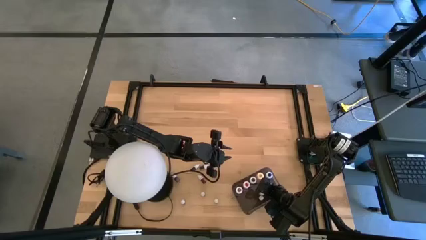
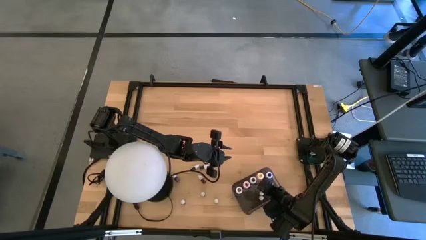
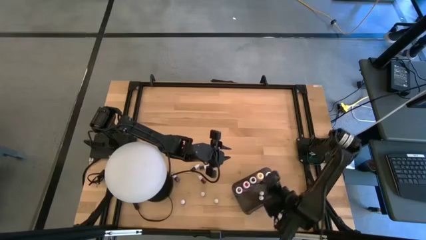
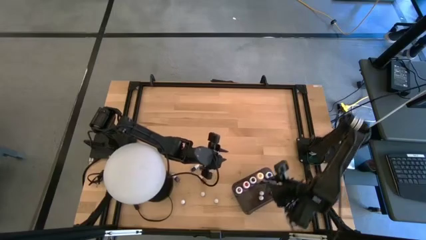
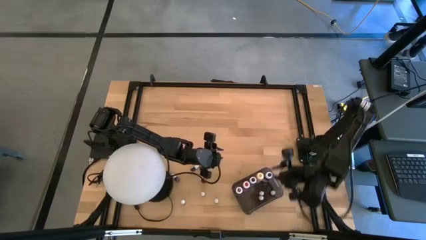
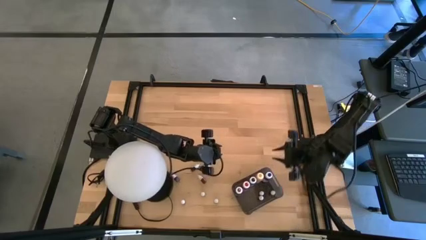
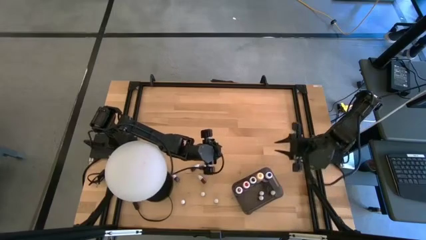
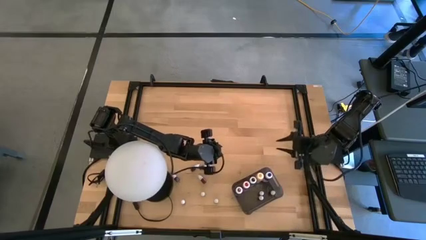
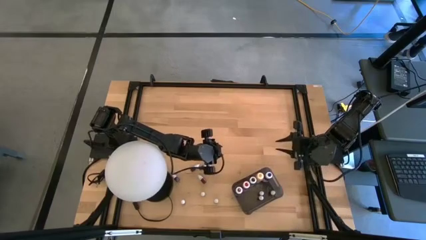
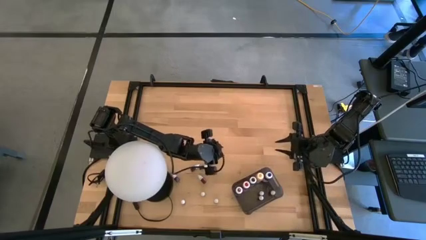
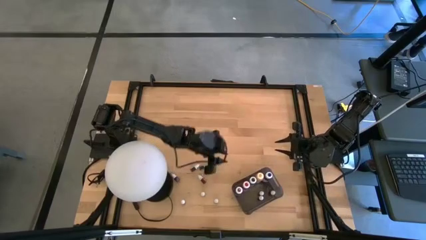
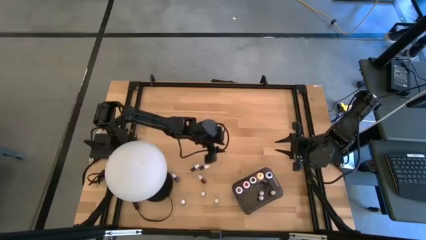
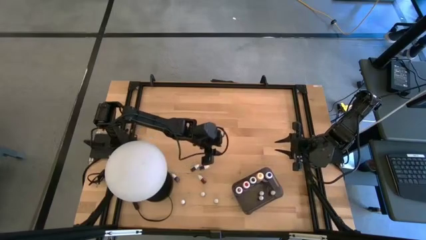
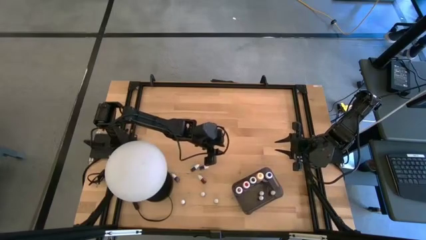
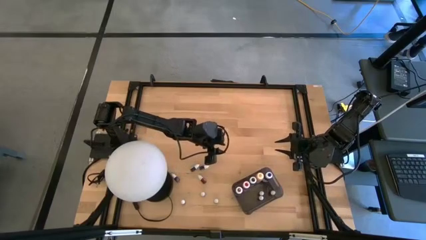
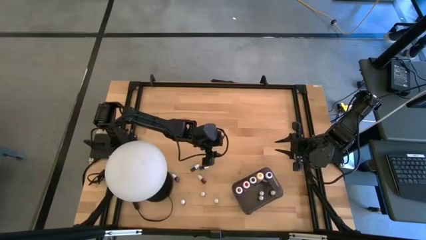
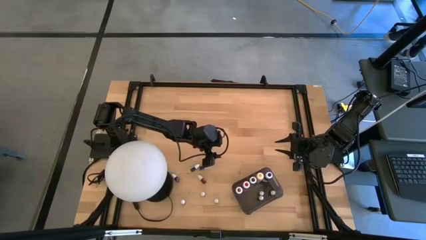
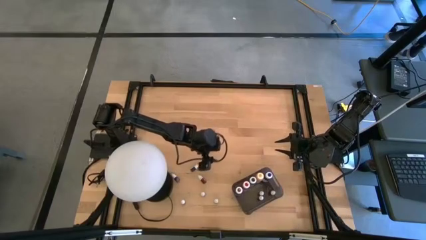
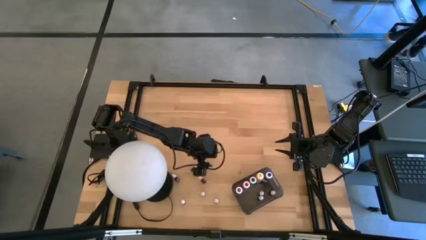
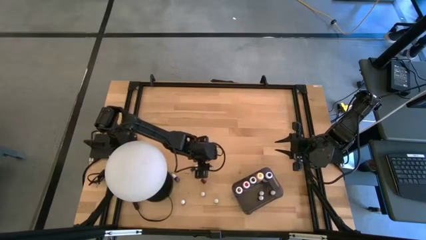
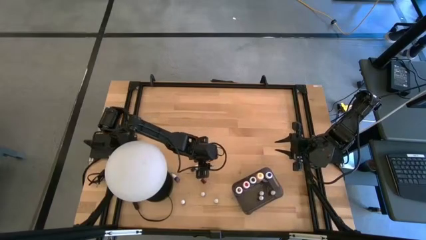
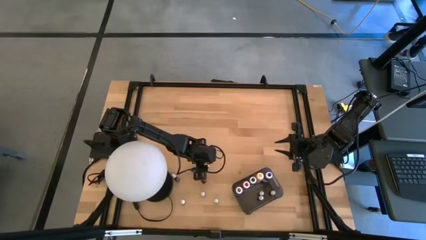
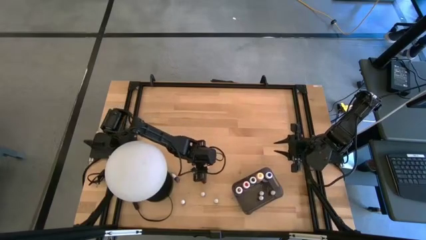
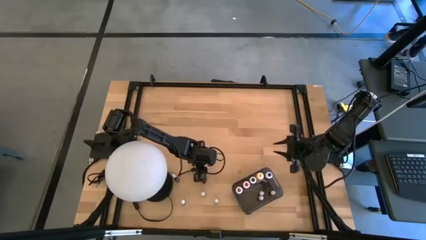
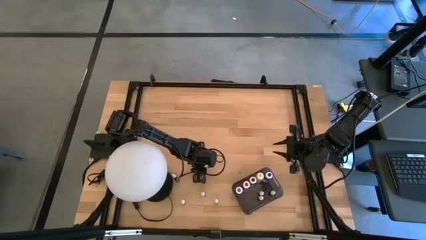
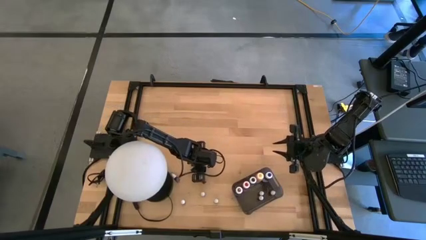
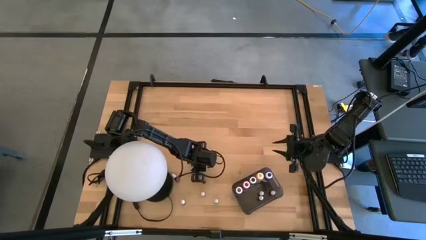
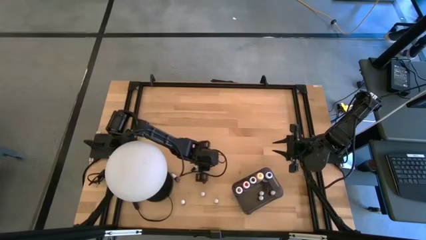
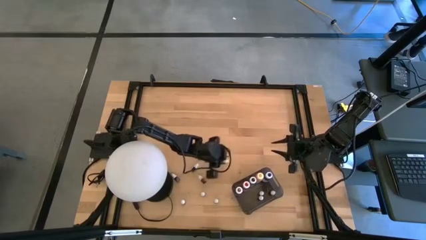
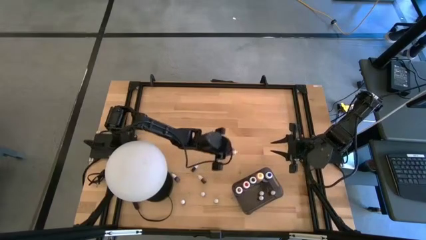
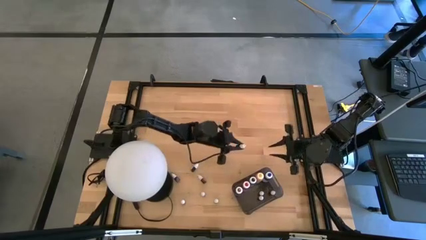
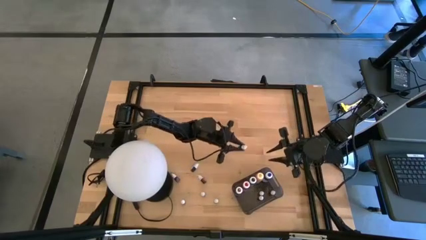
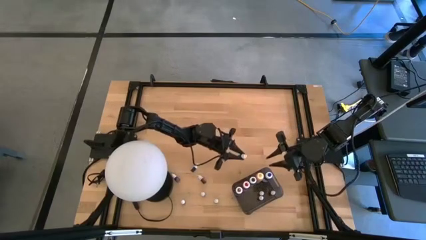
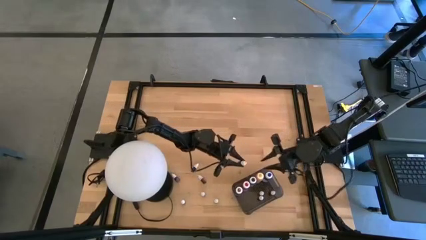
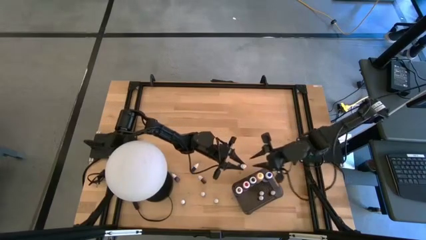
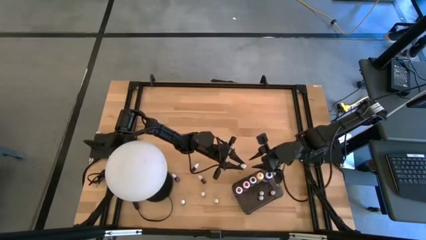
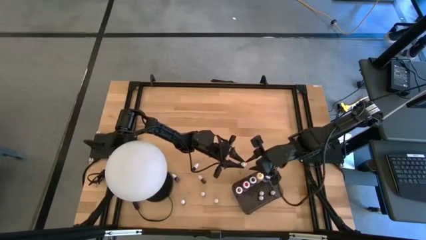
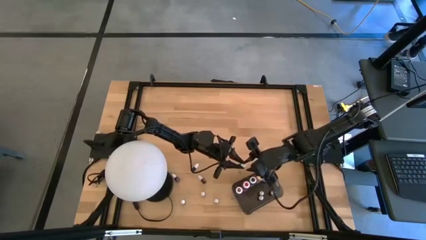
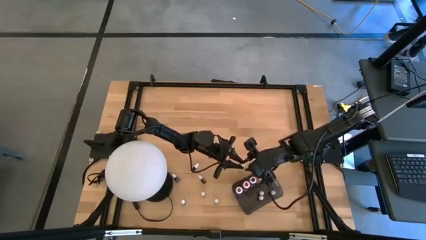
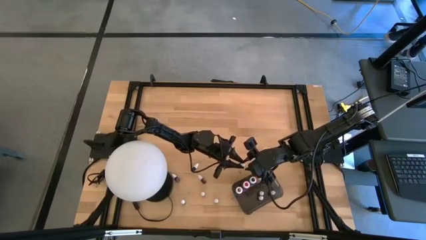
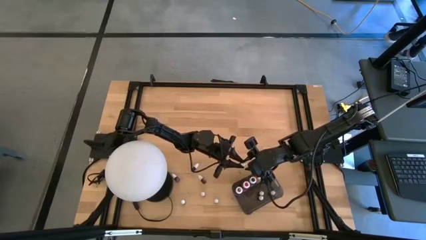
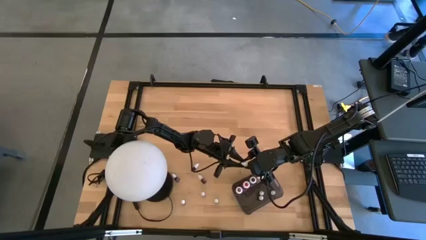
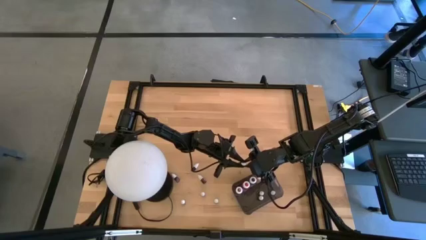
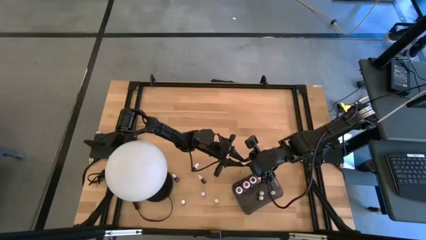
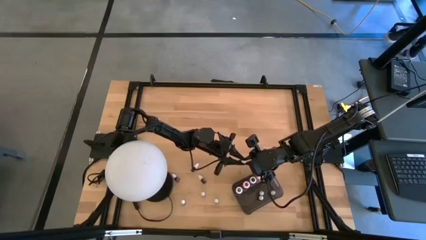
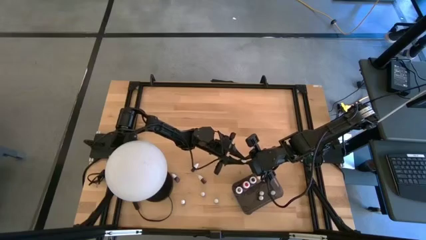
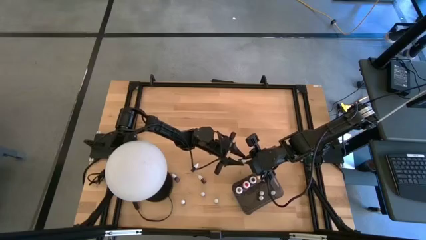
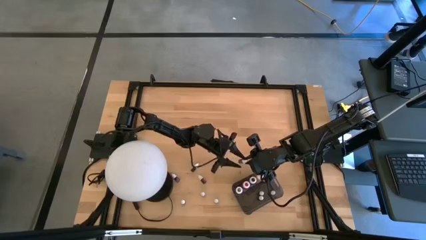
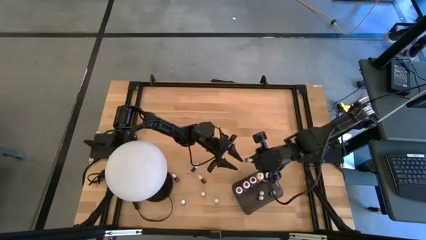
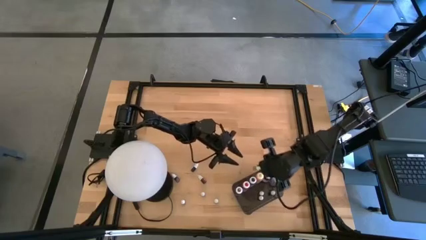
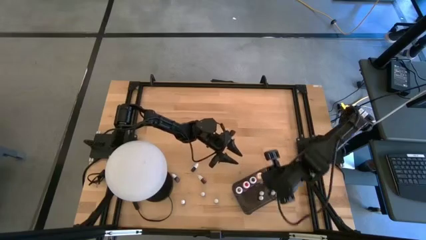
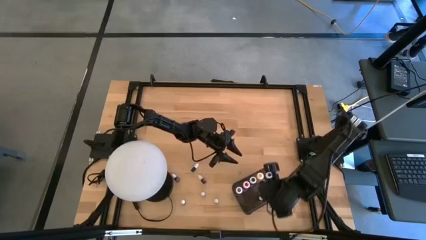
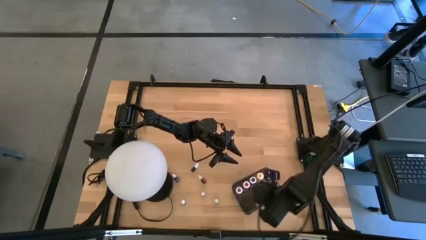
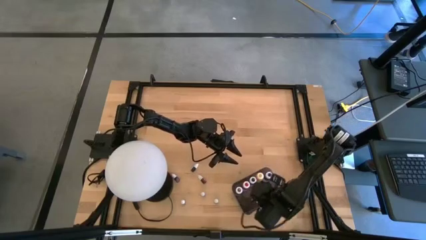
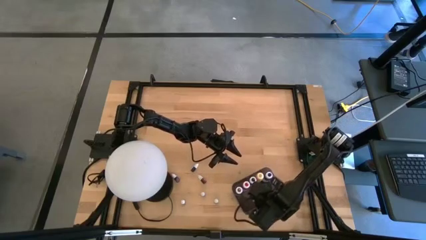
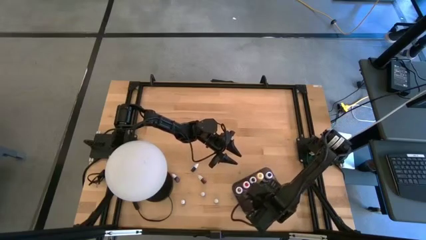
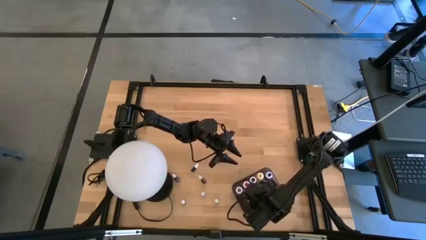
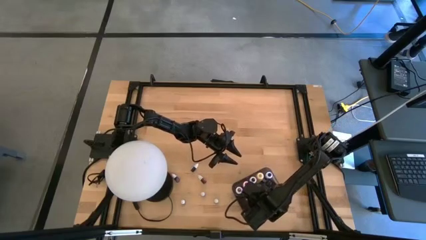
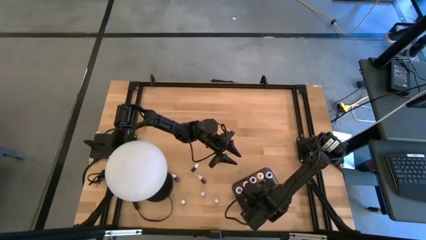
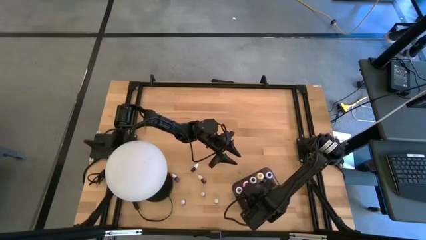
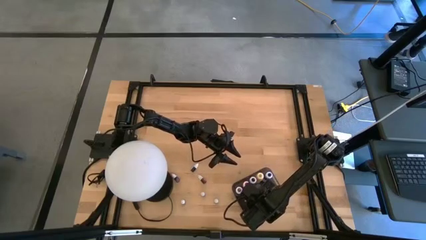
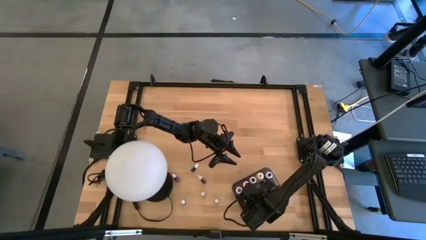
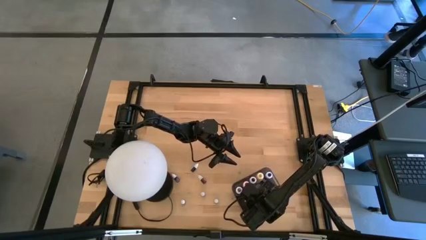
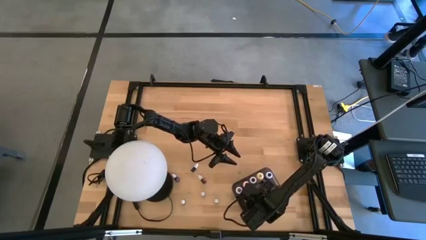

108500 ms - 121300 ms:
Task: Pick & Place food coloring
Put the small green food coloring bottle into the bin

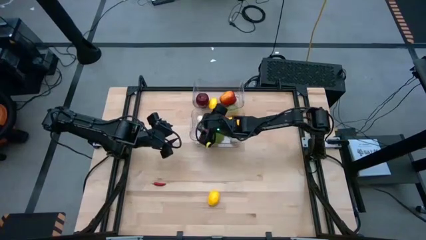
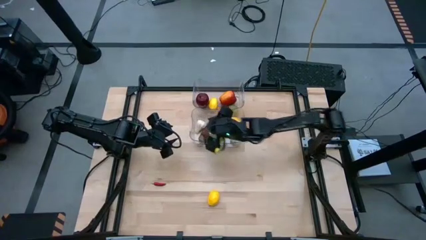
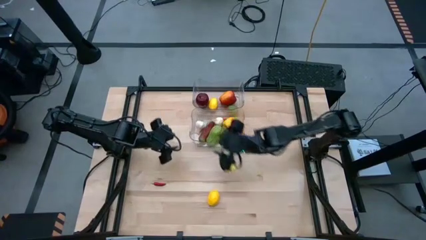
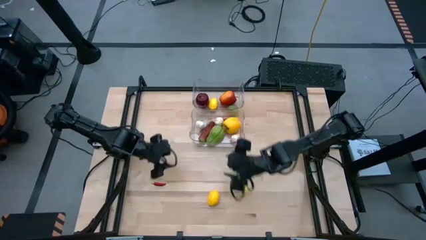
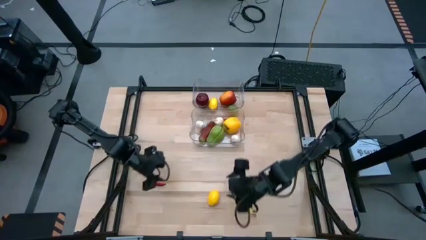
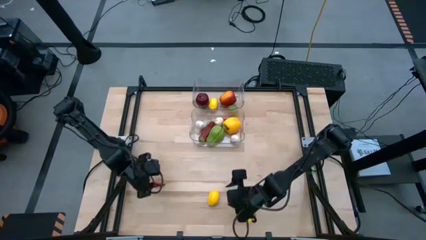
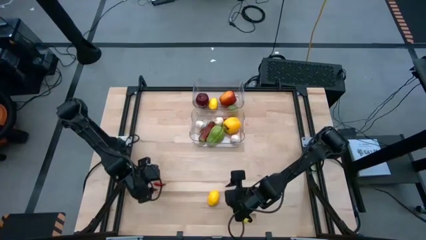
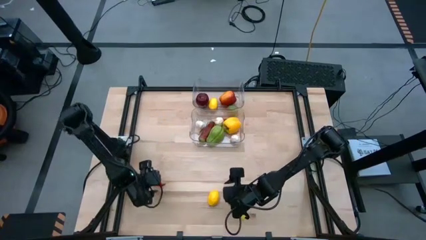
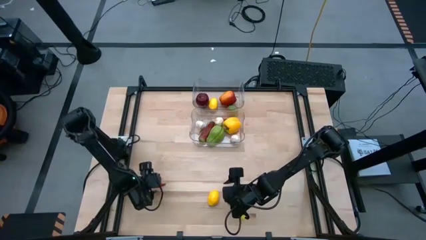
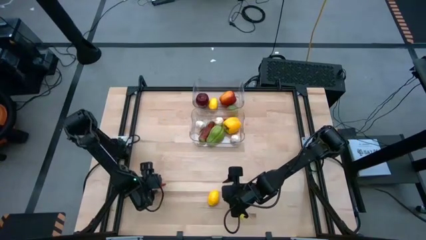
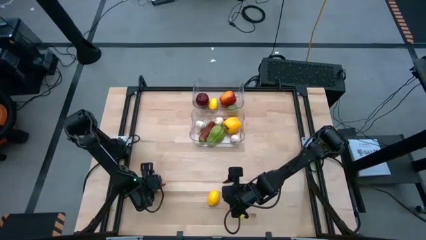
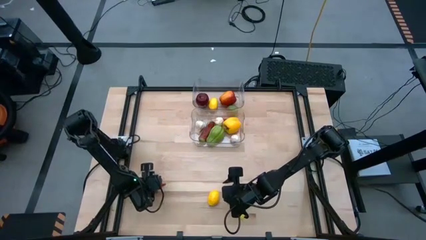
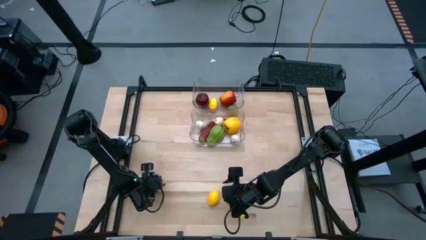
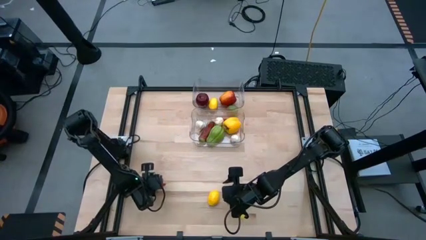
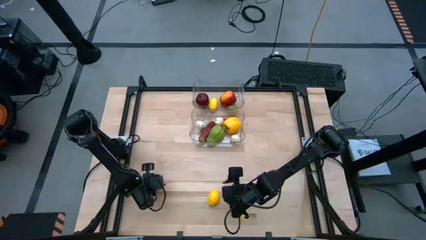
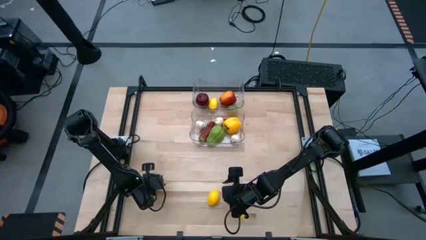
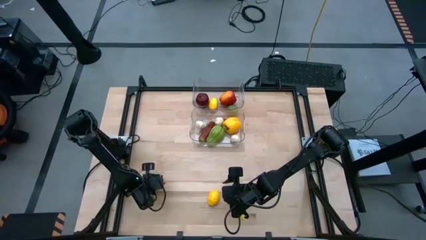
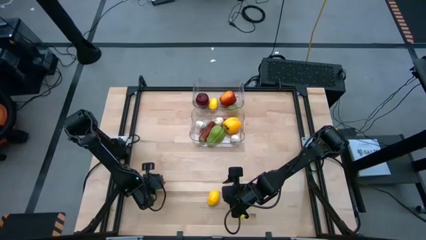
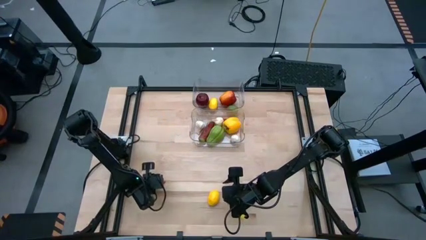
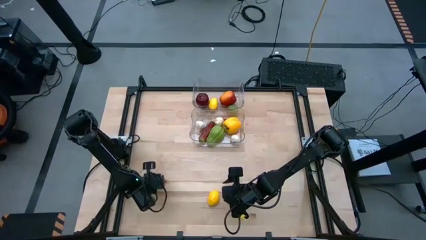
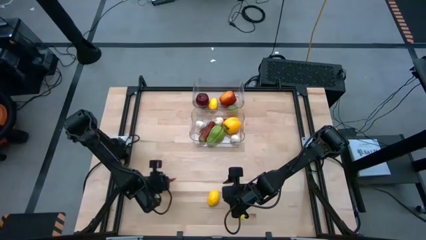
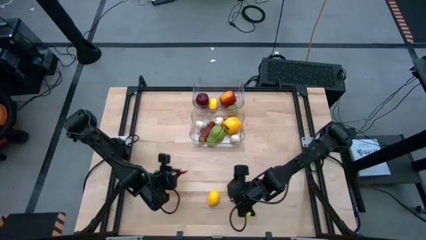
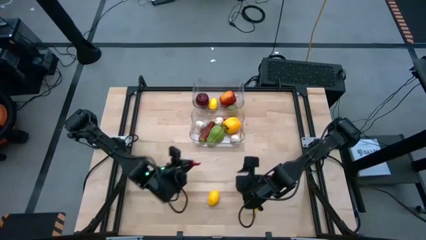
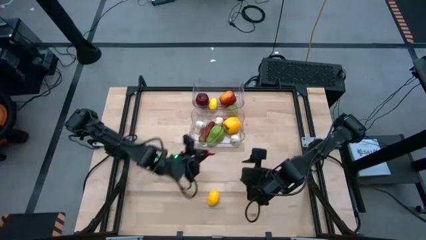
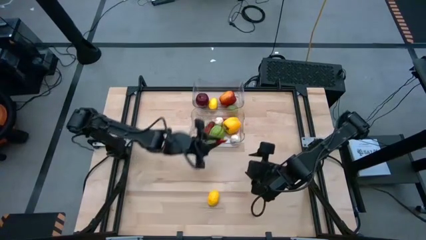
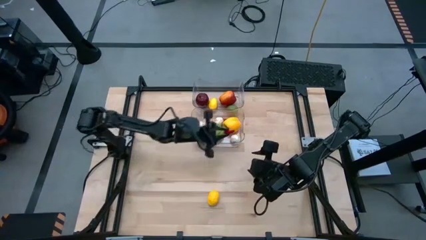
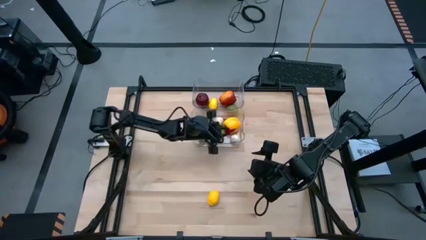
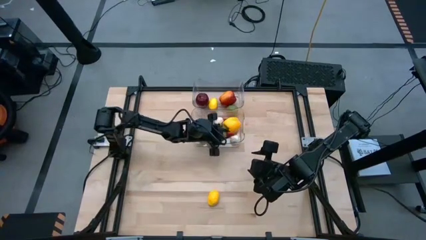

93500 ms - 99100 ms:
Task: Sort produce into baskets
Put the red chili pepper into the bottom transparent bin
